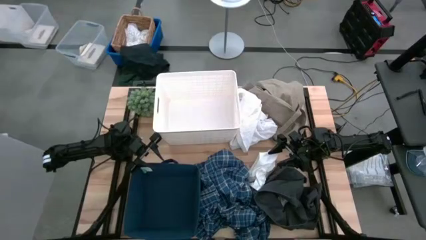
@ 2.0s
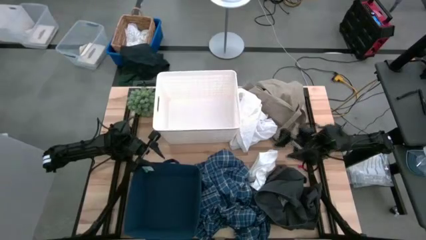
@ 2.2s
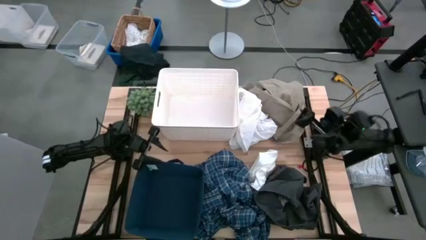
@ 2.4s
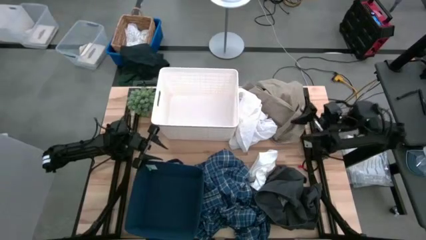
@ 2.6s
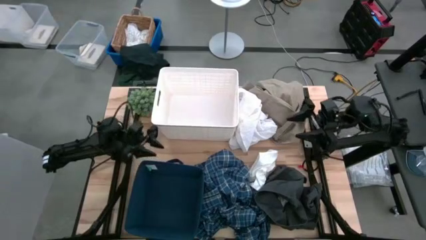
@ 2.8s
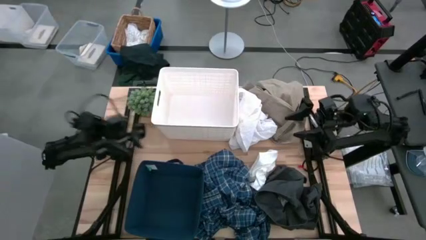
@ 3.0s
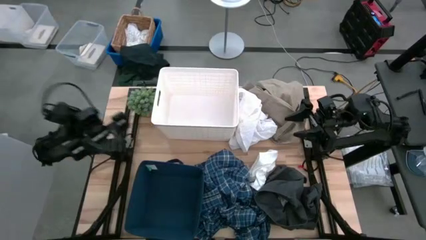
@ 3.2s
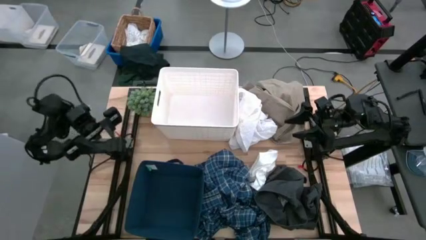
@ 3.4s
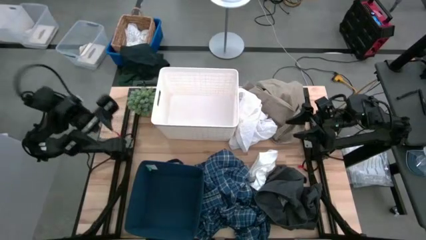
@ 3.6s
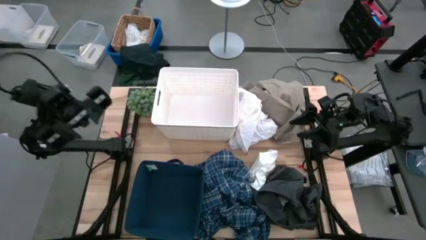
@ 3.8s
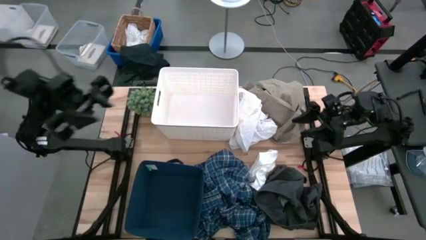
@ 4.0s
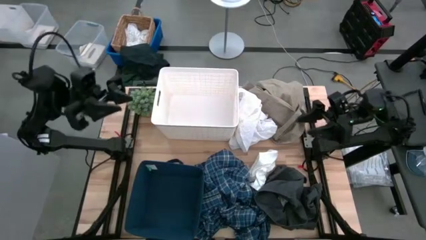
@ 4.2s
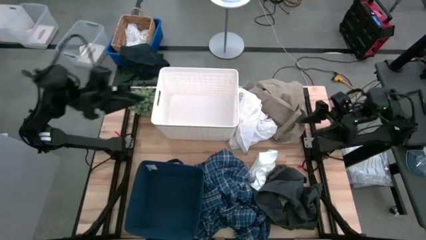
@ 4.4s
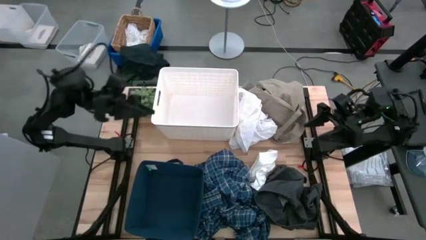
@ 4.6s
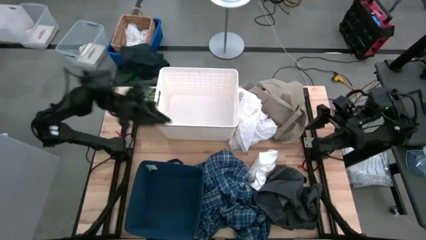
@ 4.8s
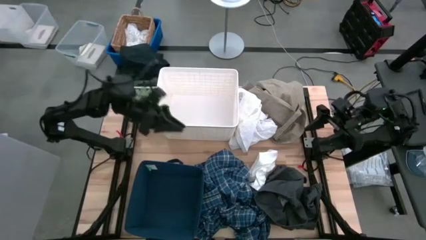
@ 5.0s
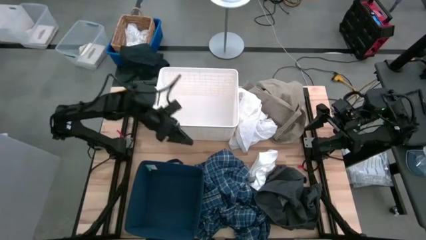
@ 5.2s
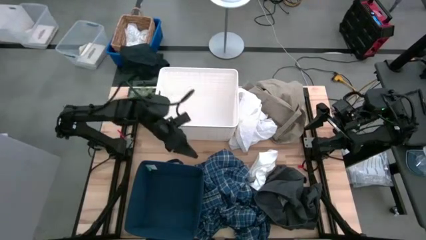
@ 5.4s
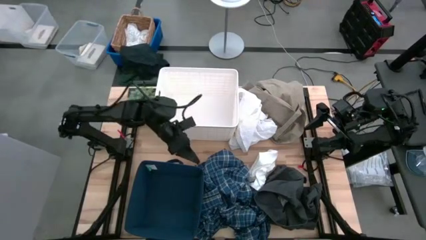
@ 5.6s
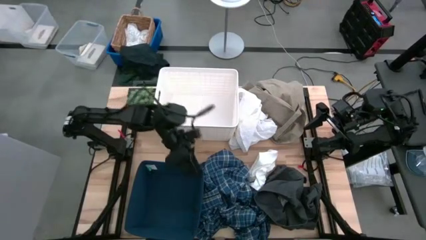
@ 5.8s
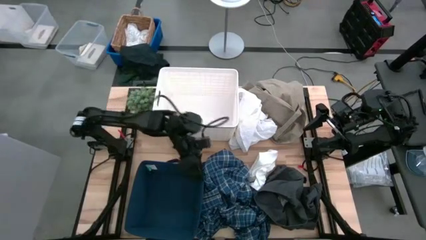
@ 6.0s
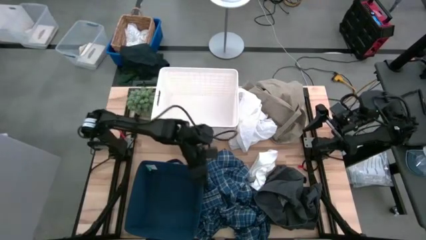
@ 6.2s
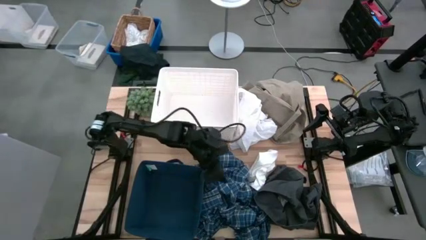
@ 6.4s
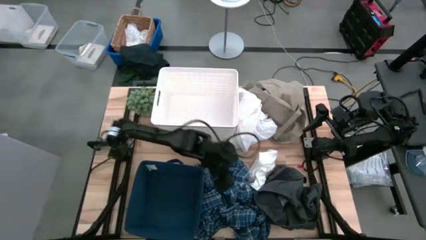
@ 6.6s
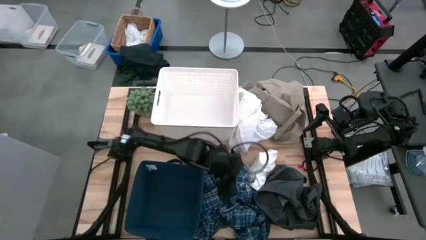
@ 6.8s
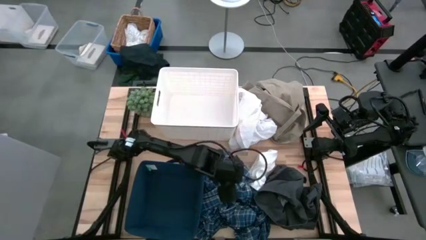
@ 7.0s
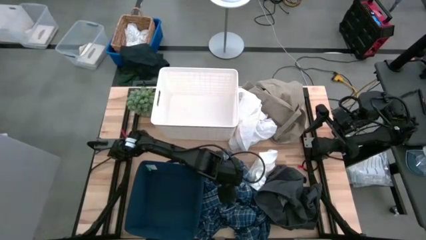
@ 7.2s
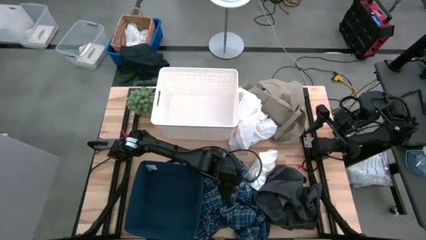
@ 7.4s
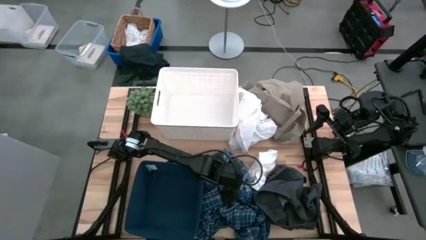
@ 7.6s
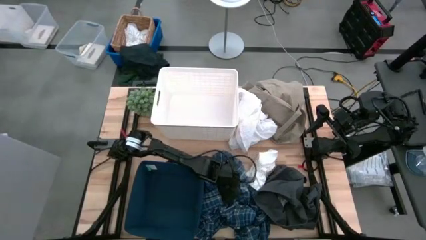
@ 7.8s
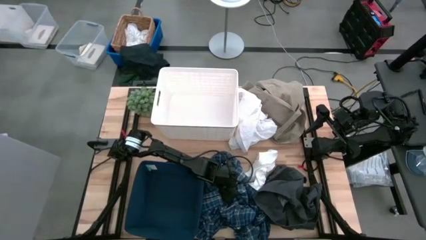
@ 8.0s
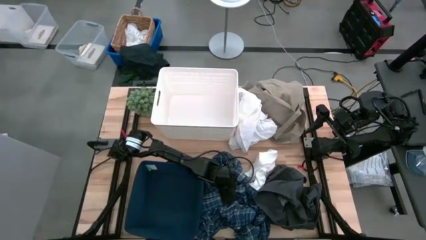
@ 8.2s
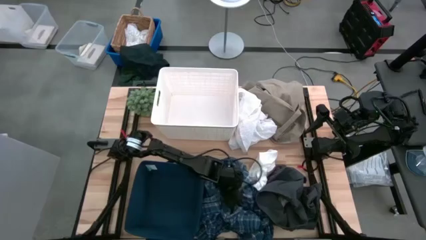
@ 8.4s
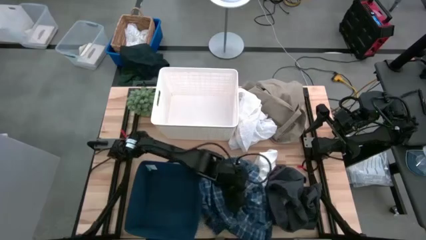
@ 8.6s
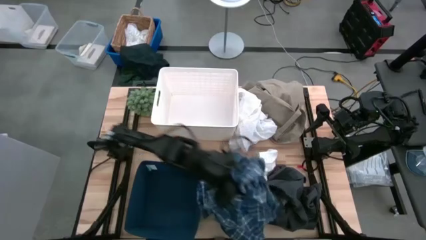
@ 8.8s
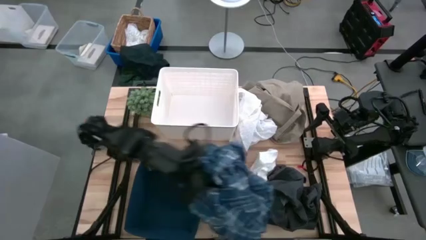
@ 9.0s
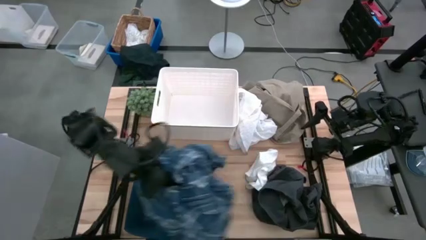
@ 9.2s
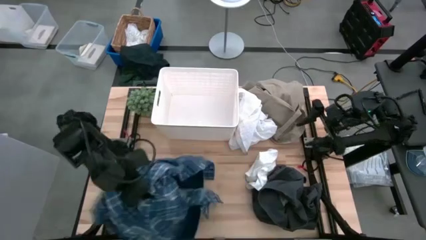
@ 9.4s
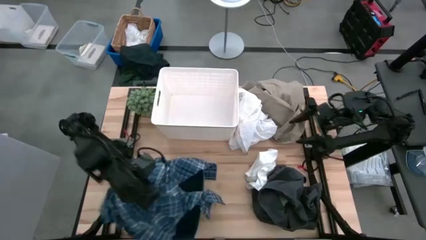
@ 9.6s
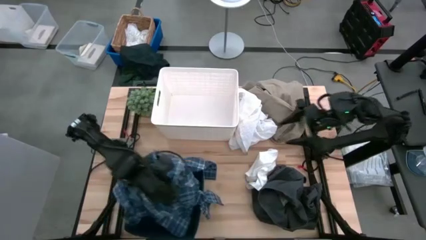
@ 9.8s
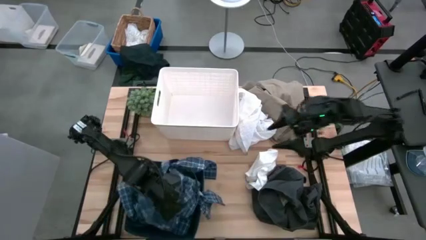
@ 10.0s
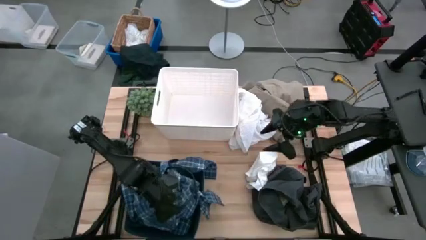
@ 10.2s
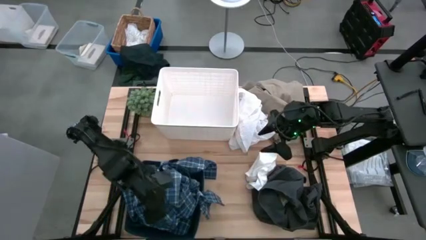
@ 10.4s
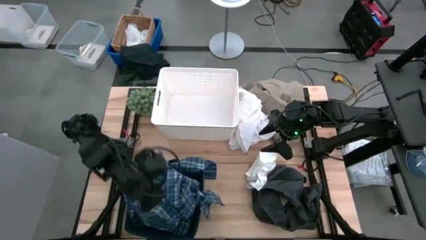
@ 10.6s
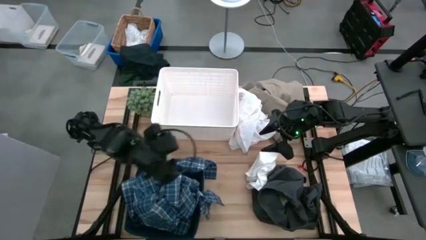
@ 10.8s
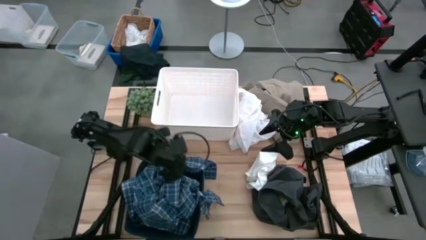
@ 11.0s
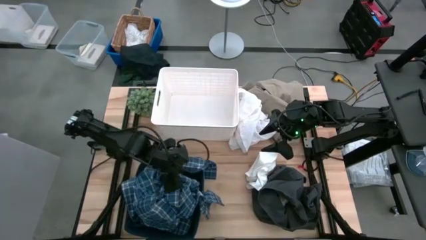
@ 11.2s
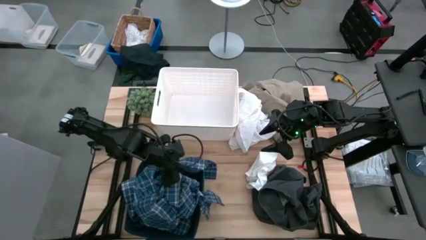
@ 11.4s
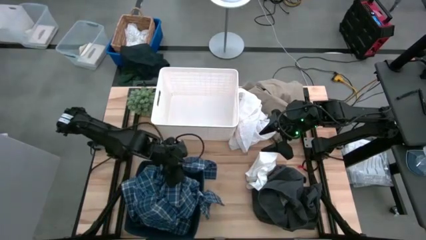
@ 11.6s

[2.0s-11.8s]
Task: Sort clothes
Put the blue shirt into the blue laundry organizer

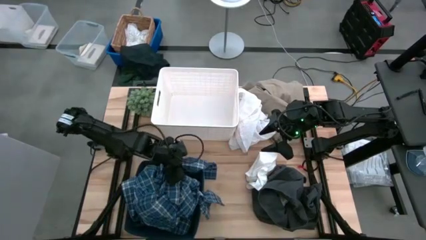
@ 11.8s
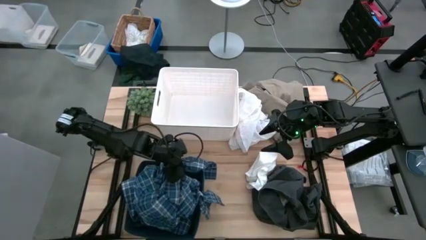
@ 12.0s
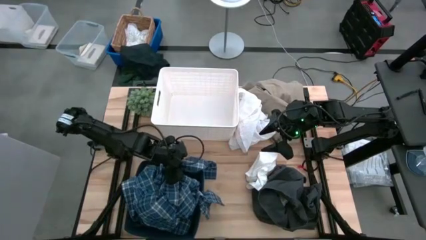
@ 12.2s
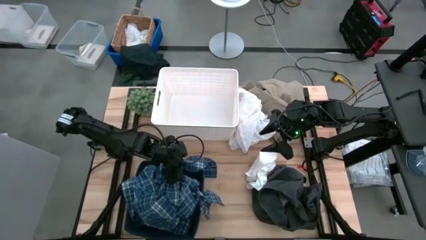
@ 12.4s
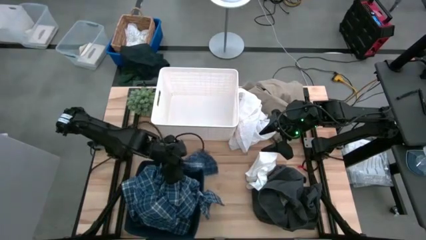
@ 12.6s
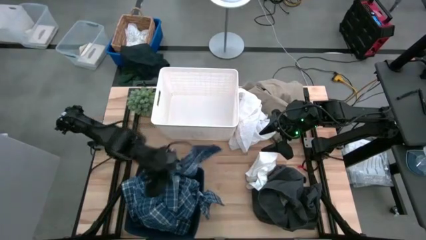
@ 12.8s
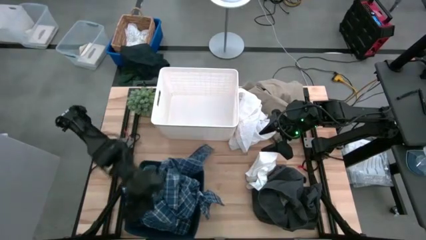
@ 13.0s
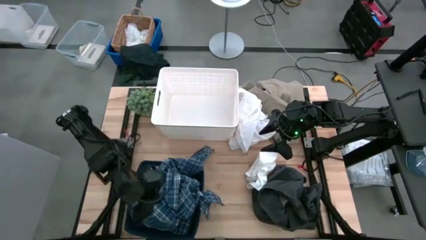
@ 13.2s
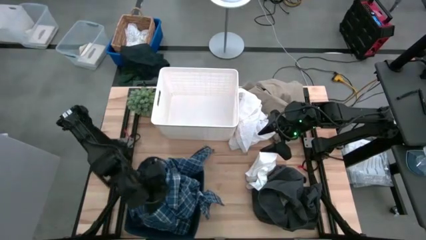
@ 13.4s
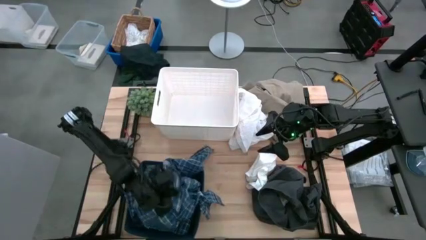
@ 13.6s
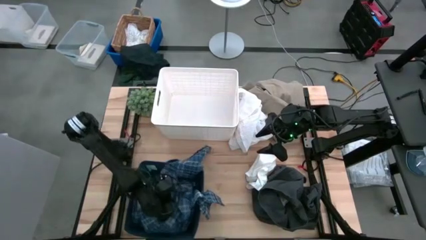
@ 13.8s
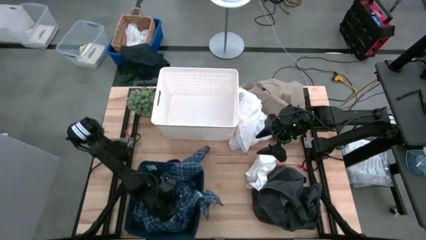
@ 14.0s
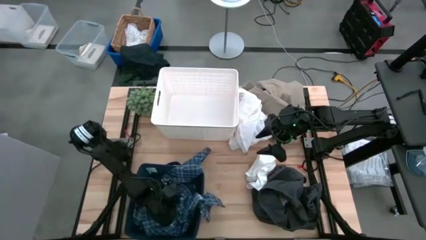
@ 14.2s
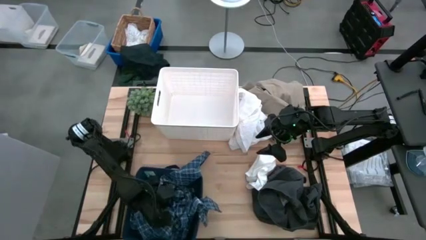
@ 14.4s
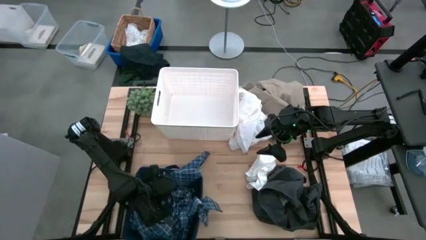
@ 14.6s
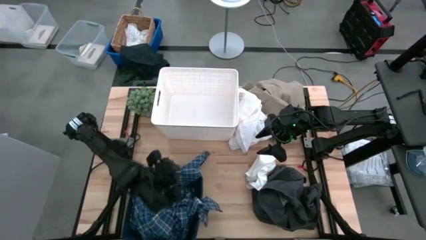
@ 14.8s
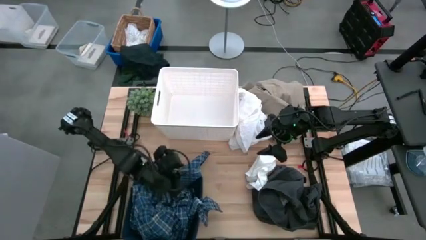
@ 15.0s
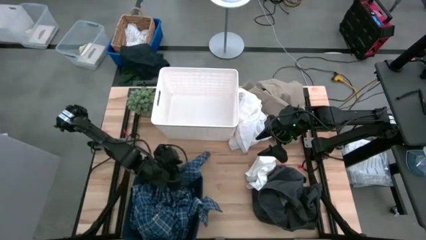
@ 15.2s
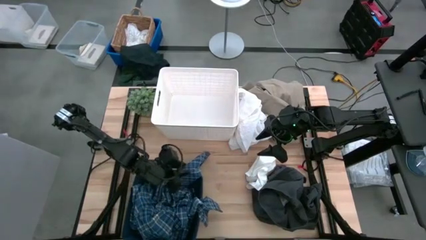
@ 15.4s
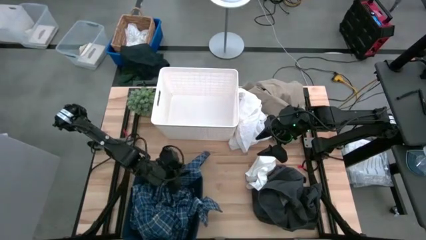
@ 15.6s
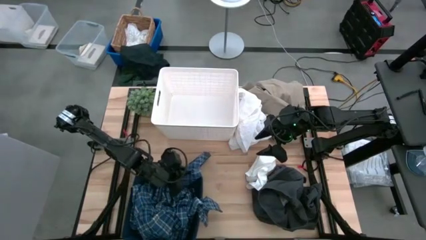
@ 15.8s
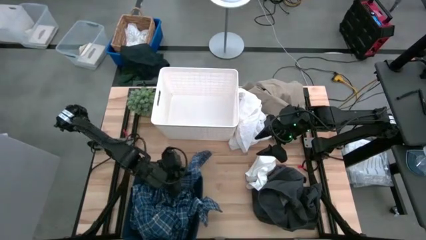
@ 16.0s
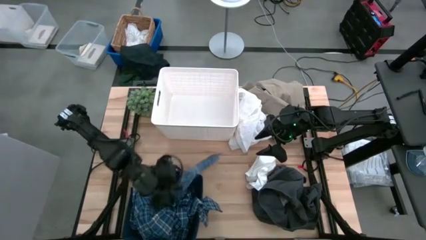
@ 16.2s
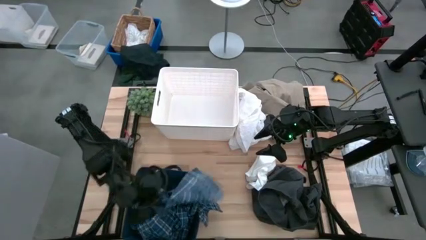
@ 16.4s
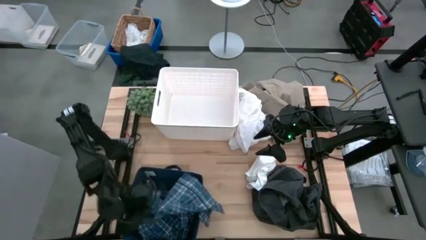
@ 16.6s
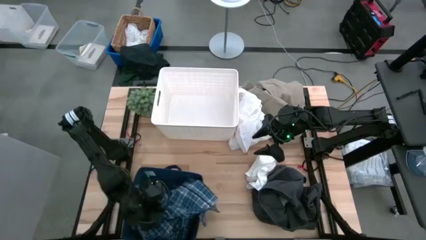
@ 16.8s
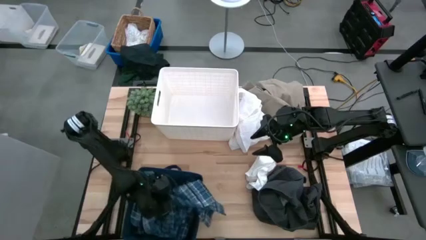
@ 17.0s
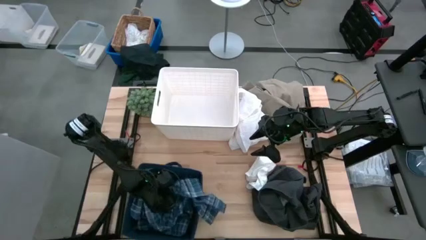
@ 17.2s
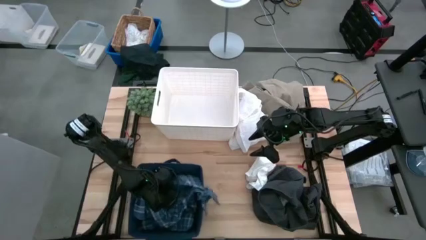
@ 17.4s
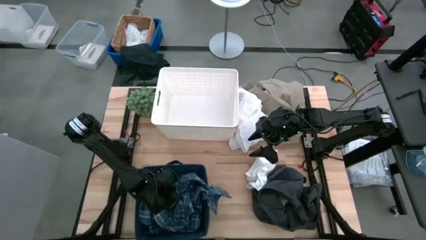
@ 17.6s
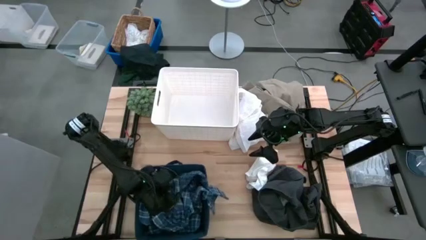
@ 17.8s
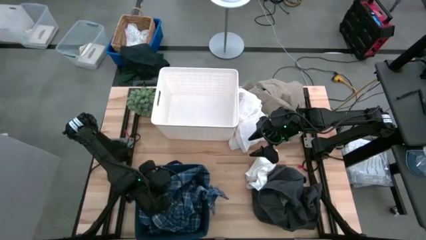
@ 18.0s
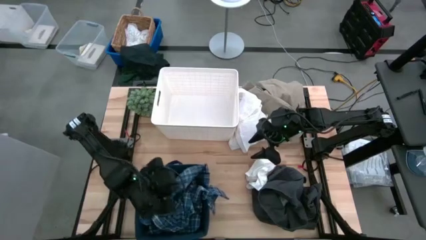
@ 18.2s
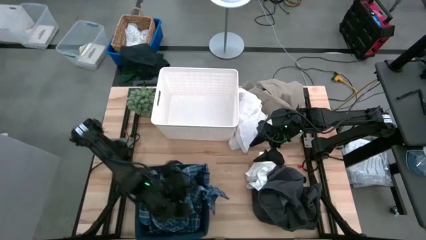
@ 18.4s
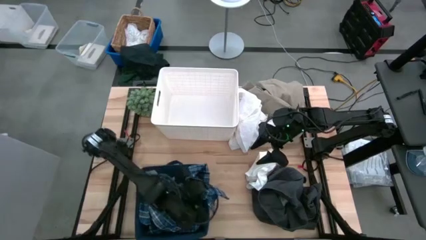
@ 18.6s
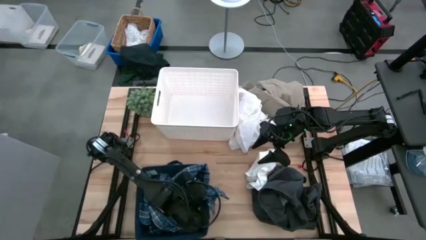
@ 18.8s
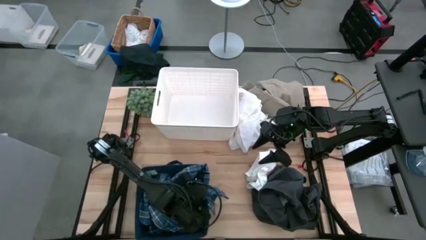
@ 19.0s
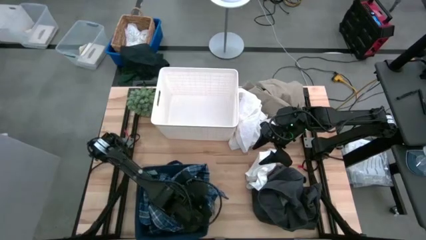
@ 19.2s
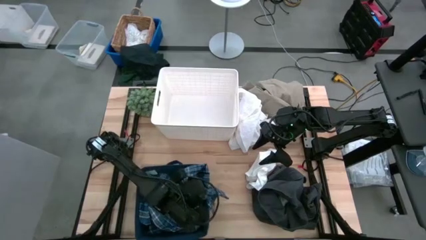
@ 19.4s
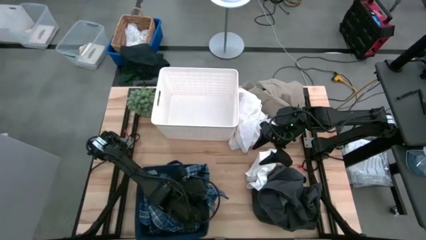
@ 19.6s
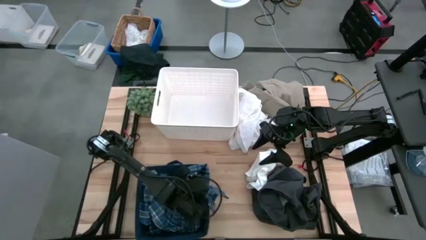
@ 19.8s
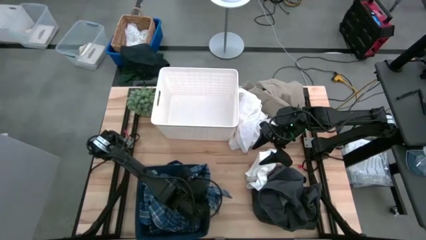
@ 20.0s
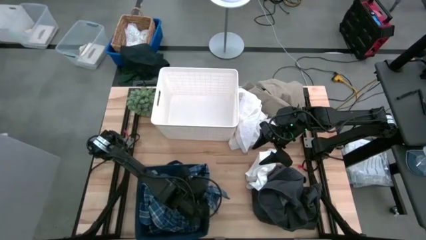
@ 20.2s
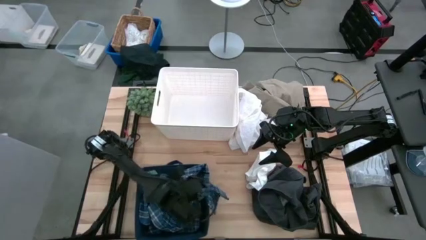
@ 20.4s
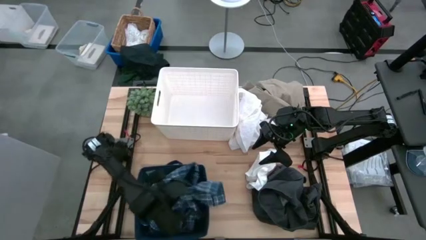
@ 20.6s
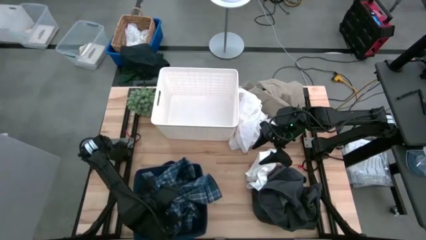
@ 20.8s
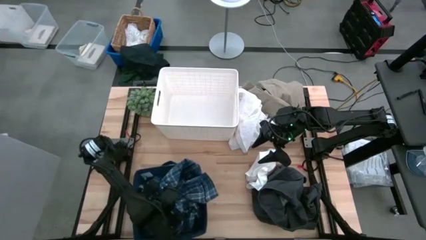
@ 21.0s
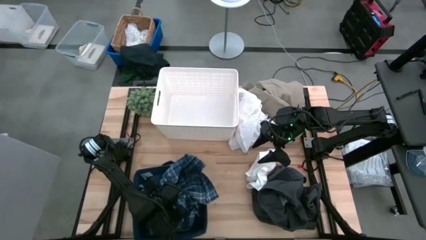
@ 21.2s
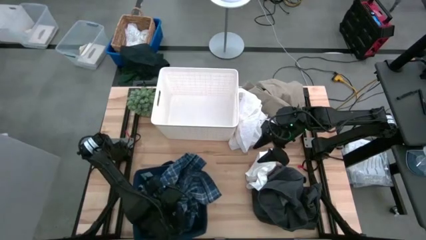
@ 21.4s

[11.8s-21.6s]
Put the blue shirt into the blue laundry organizer
